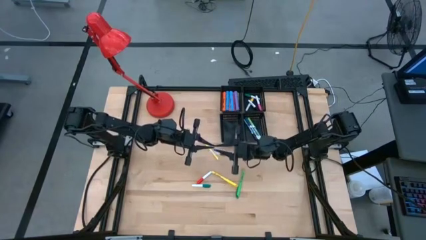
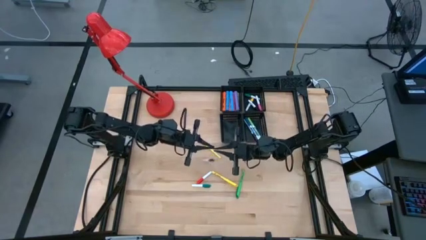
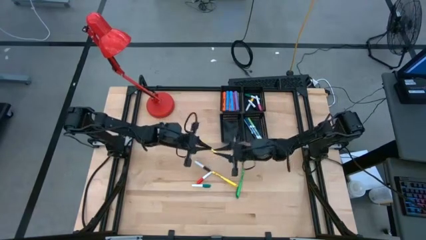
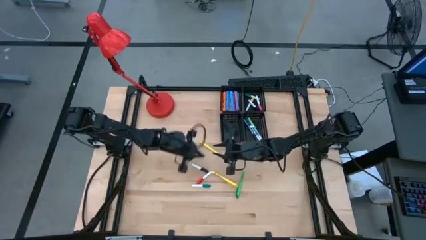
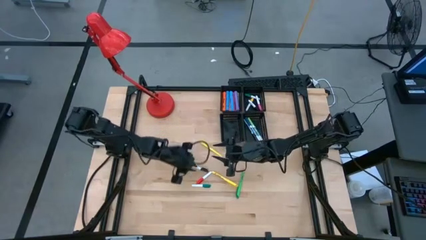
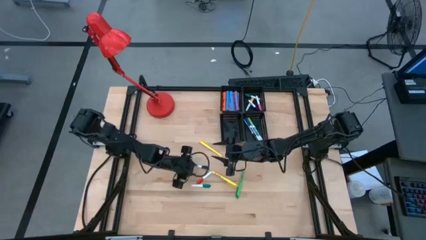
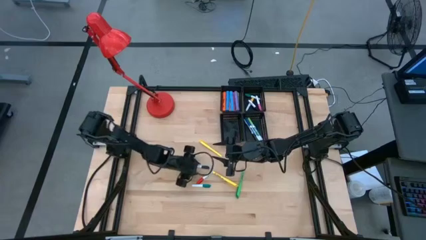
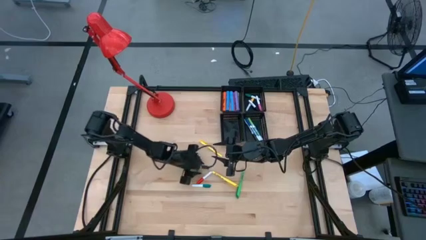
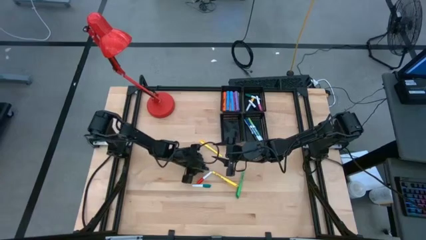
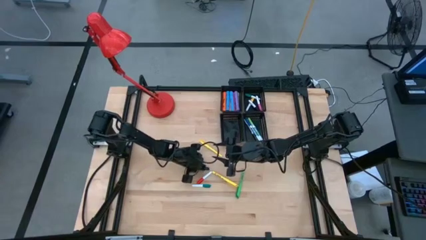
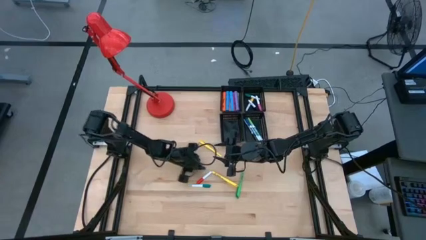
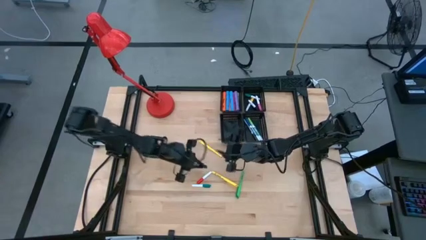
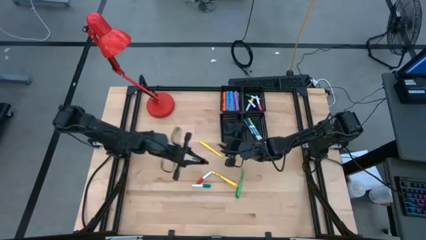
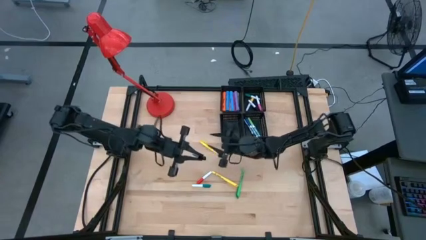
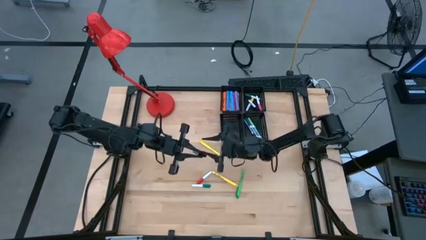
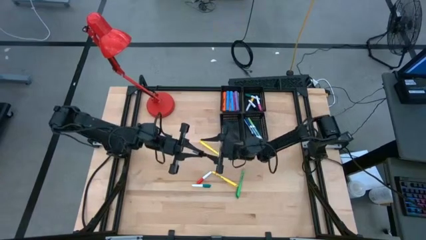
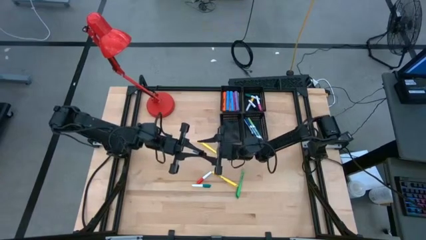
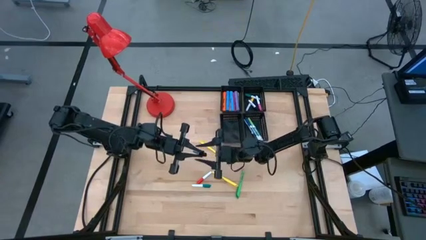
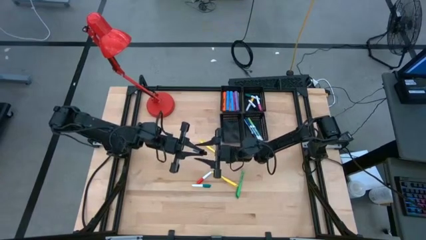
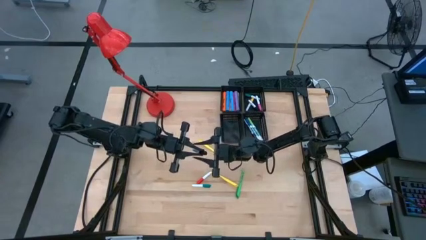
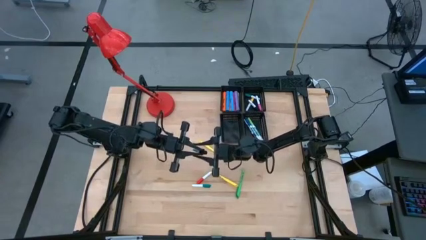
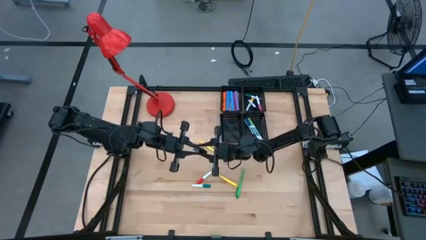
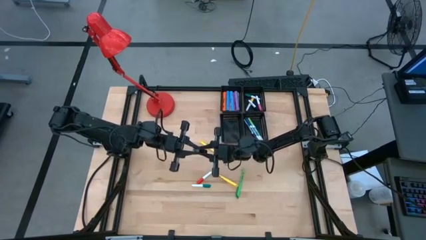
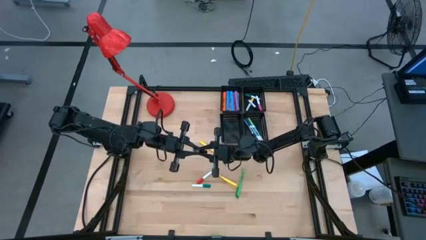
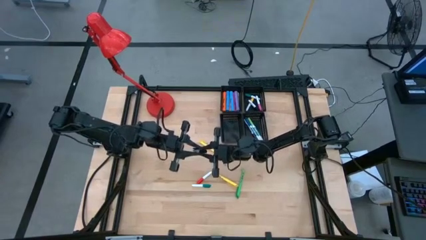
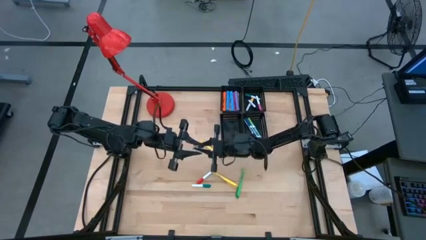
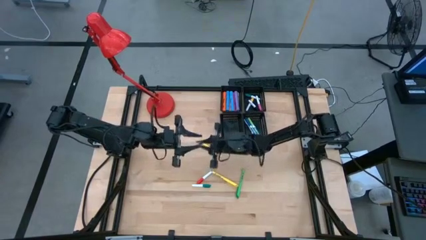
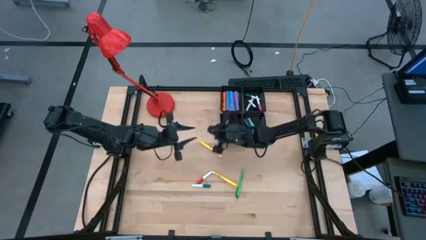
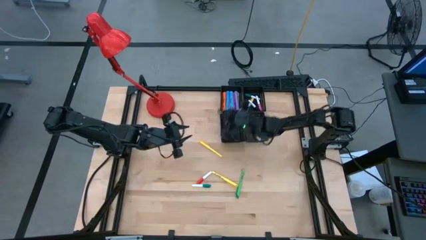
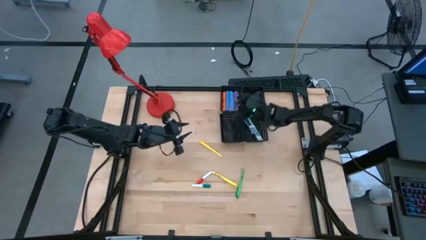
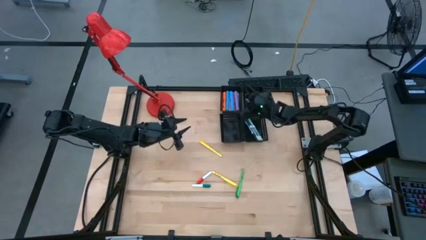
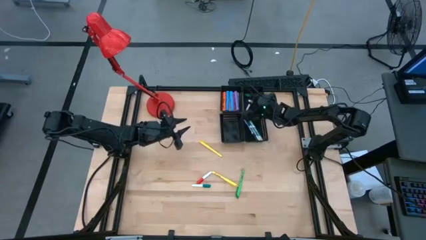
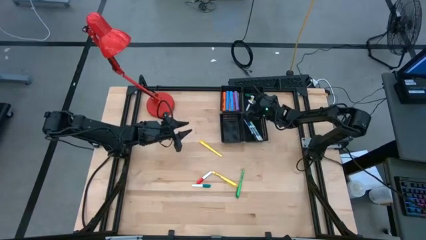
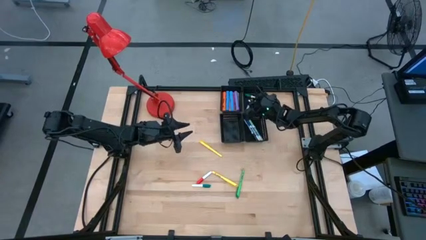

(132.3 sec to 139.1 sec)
Task: Pick & Place Markers
Put the black and white highlighter pen into the top right black bin

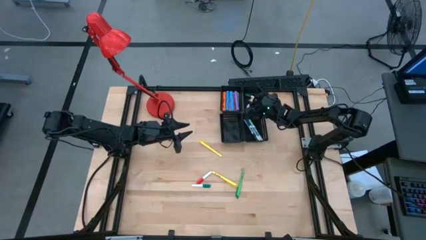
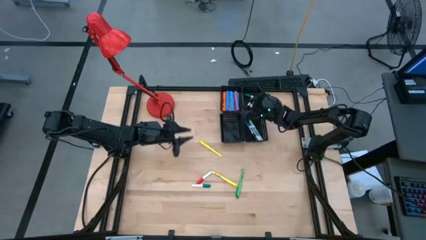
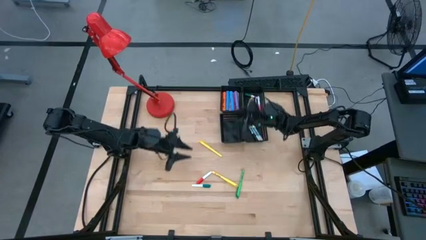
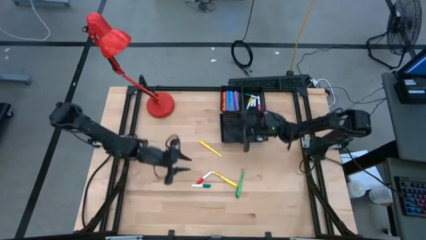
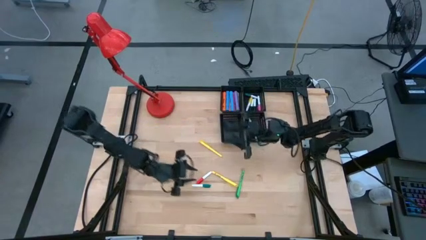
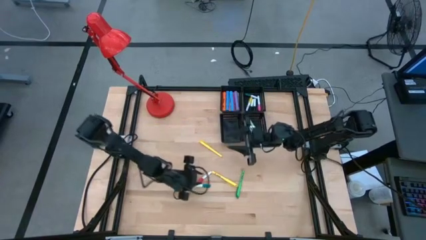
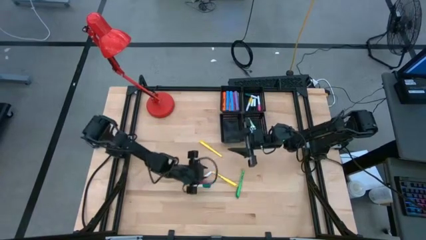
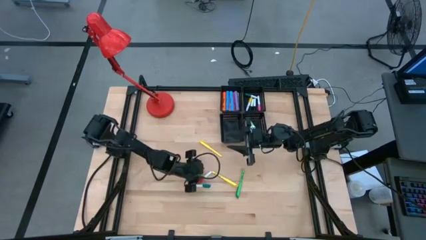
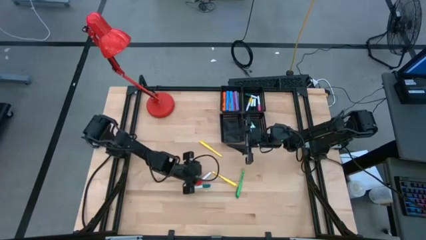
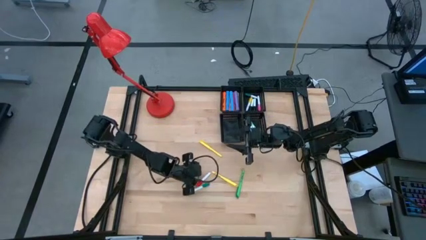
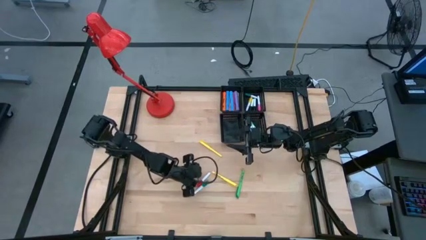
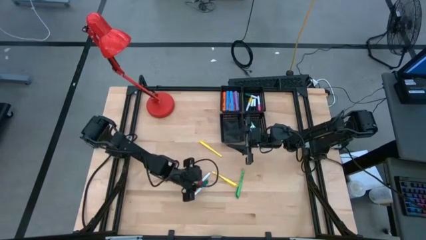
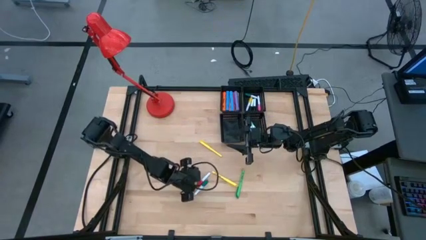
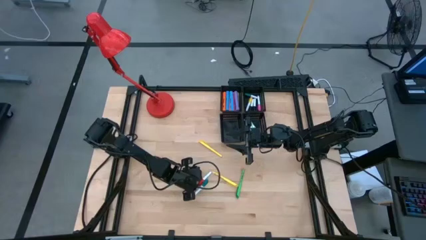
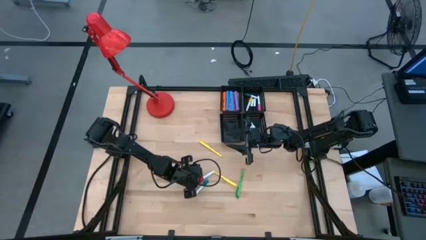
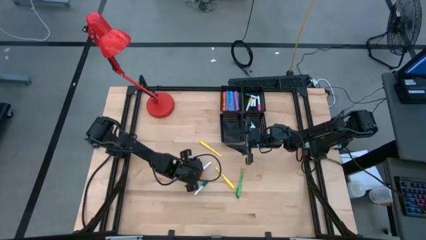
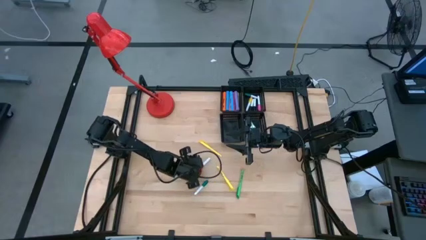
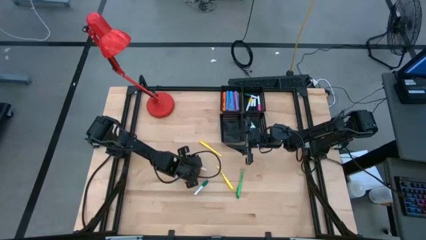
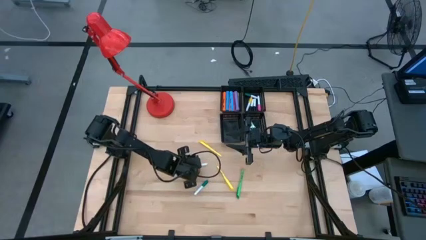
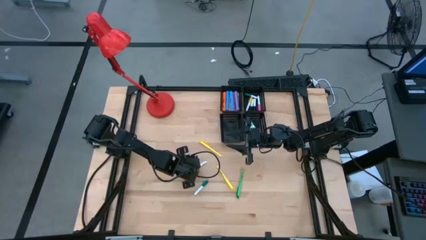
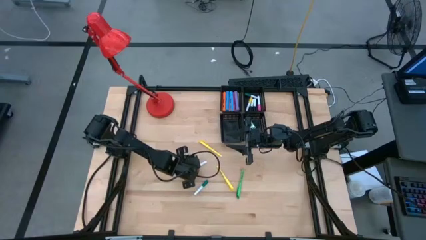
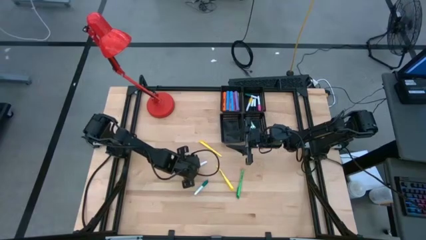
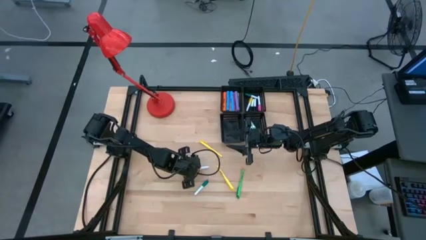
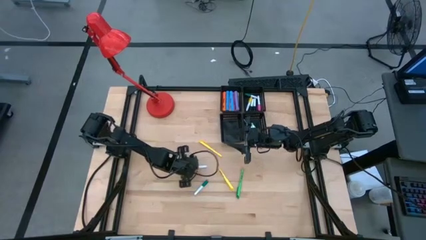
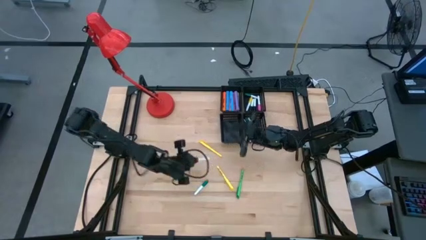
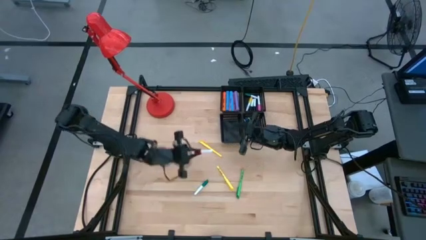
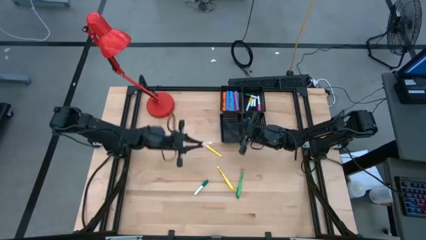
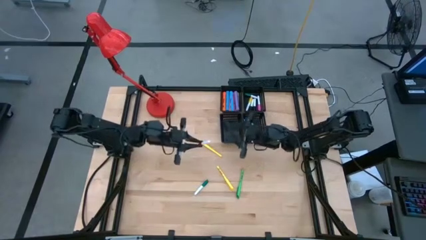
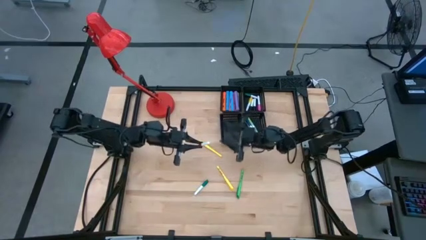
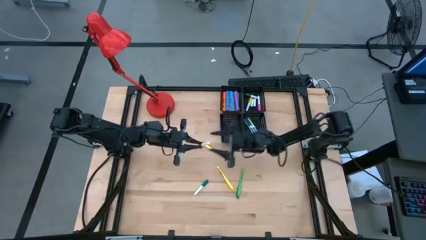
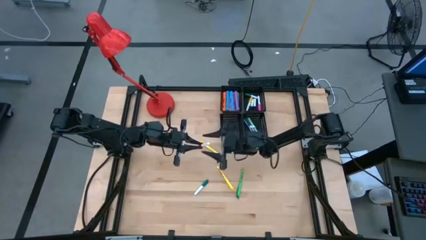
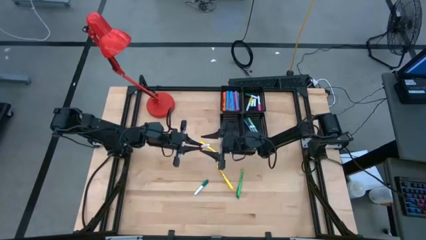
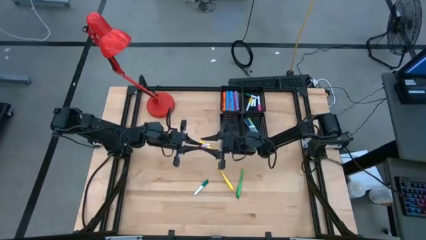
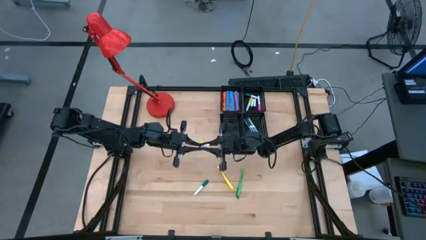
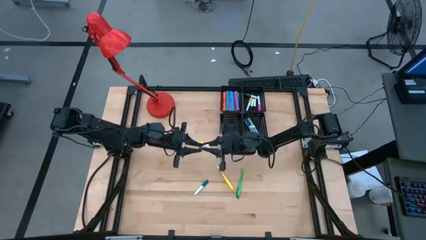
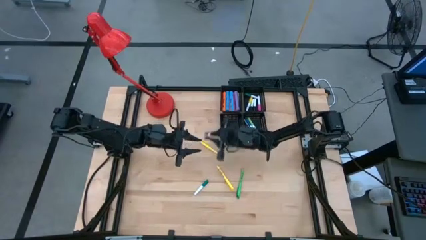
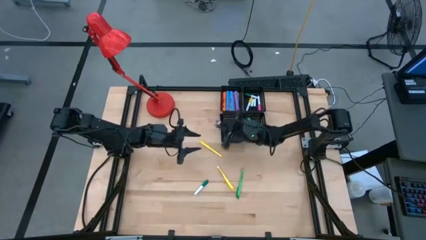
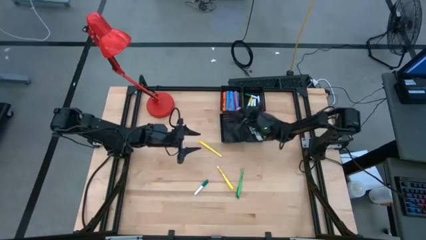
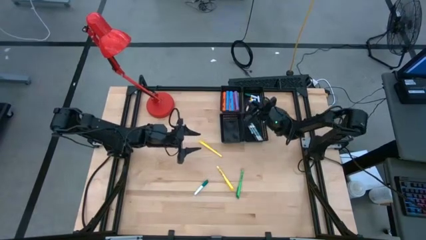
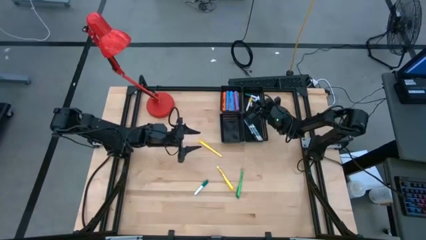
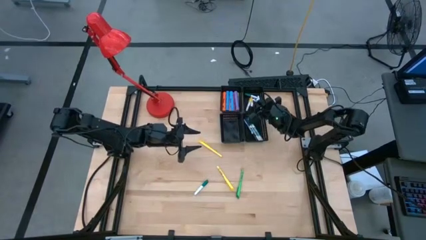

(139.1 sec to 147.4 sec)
Put the red and white highlighter pen into the top right black bin

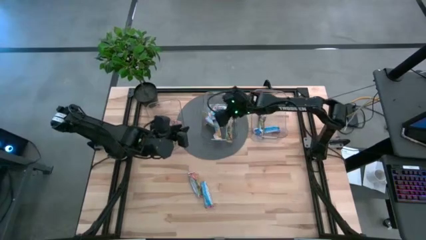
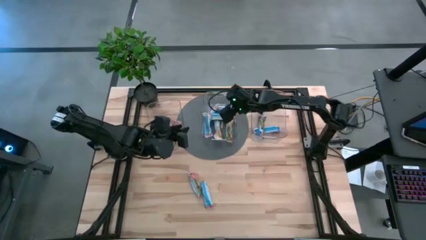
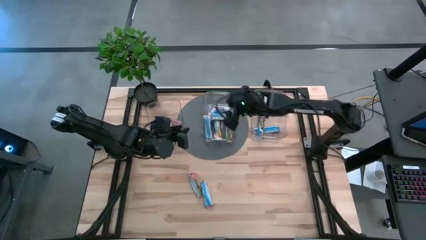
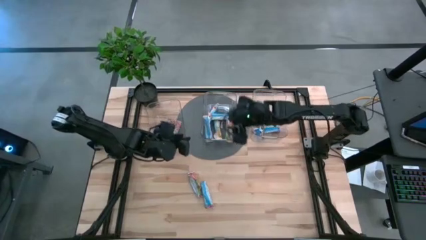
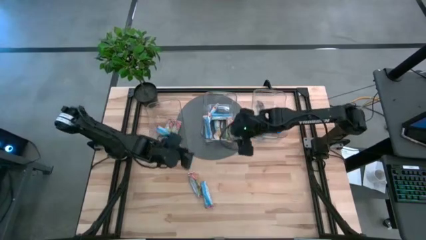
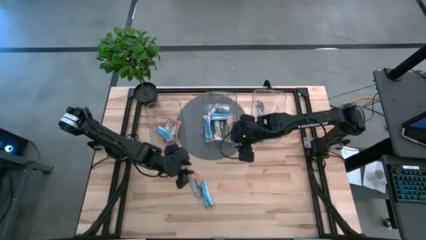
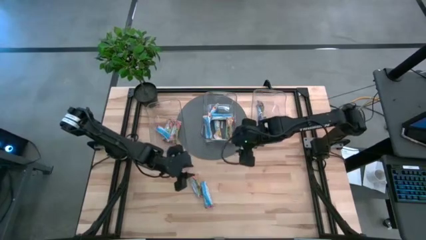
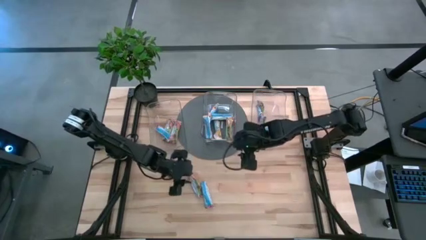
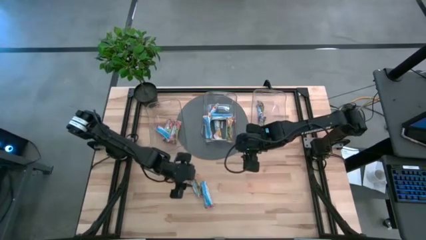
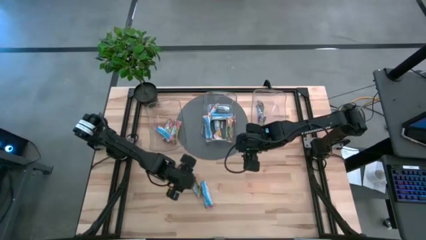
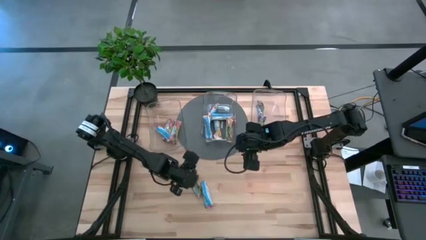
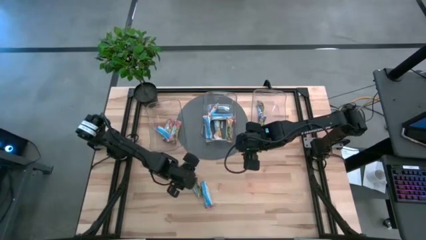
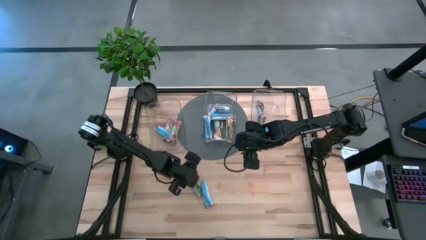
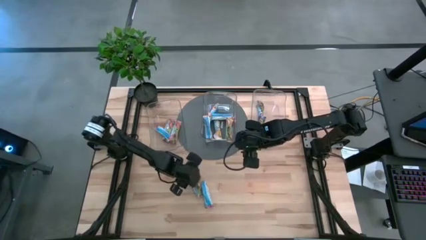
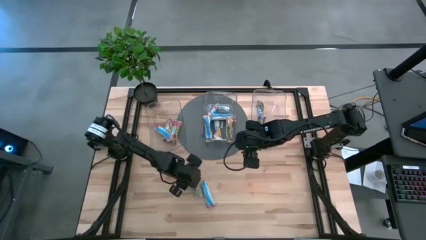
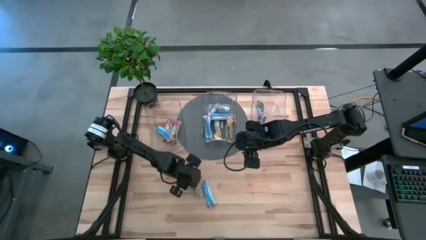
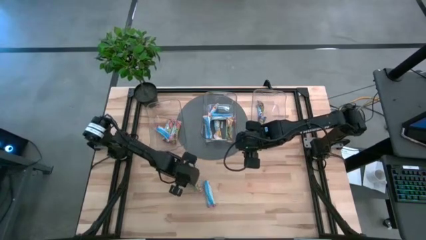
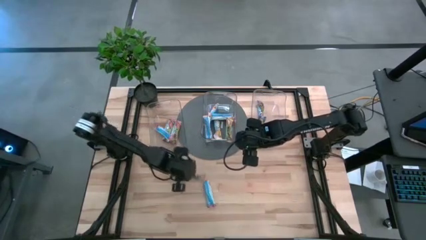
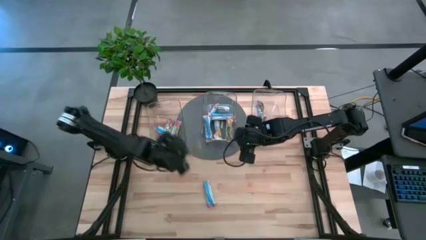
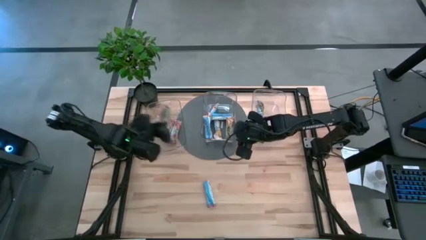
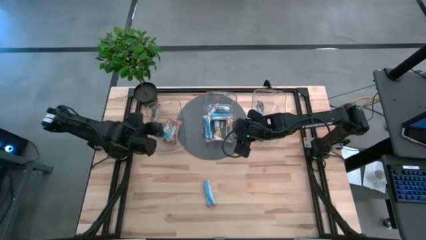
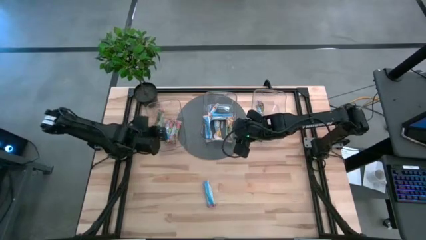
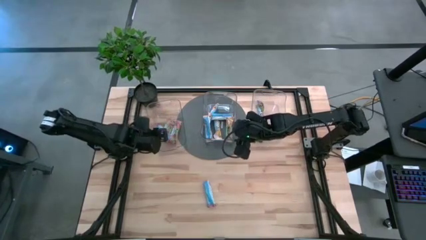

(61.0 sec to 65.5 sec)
Task: Pick and place Granola Bars by type
Put the red granola bar into the left transparent bin
